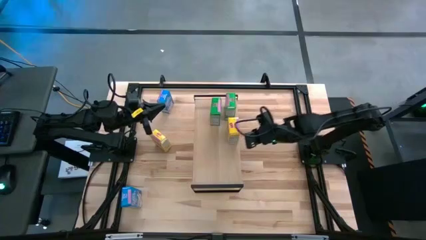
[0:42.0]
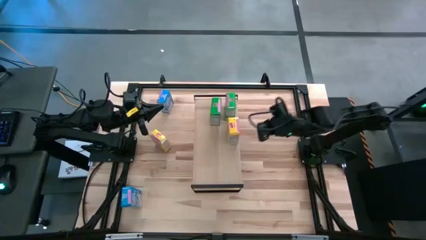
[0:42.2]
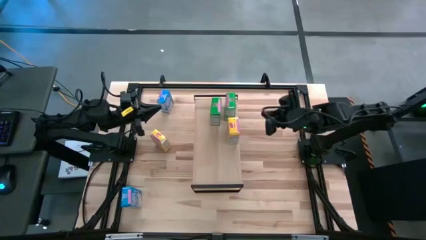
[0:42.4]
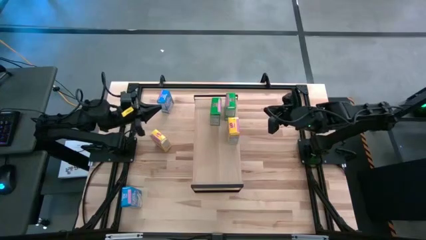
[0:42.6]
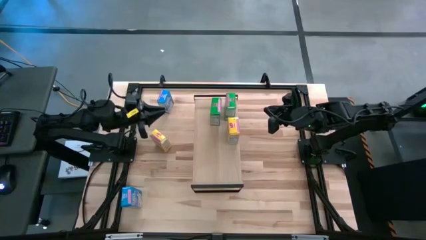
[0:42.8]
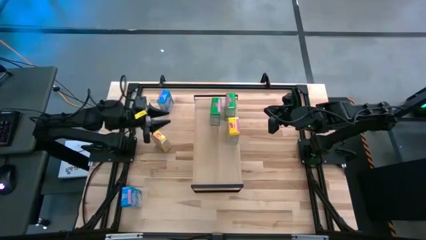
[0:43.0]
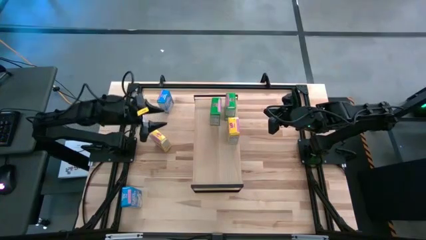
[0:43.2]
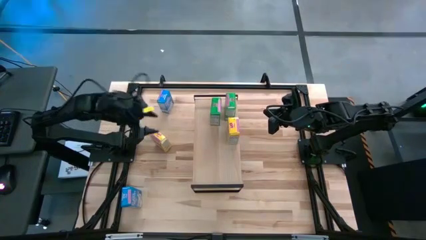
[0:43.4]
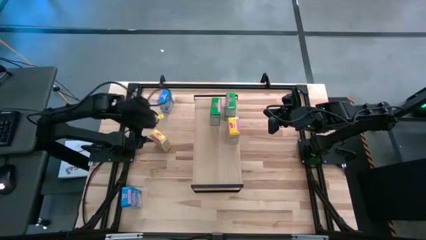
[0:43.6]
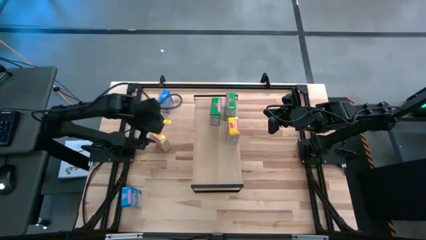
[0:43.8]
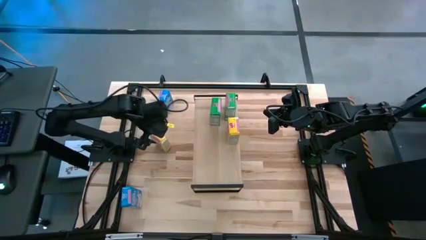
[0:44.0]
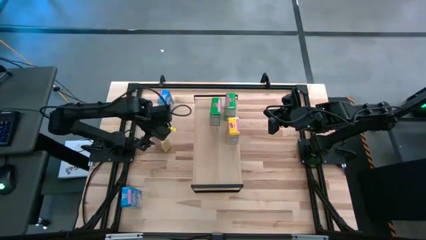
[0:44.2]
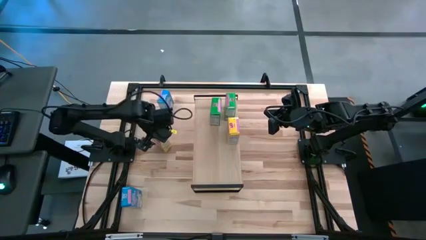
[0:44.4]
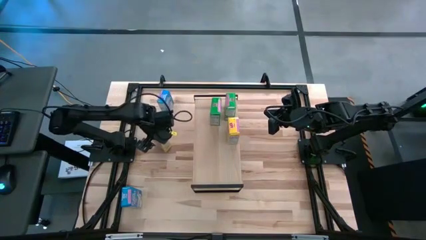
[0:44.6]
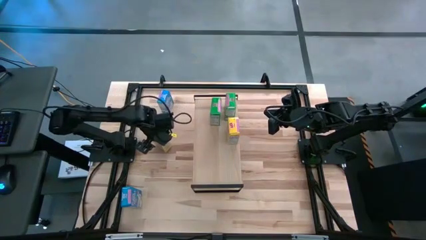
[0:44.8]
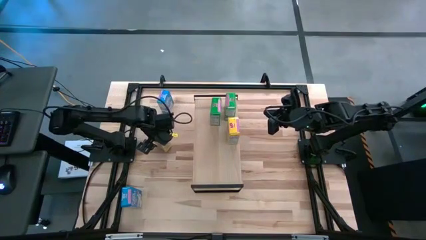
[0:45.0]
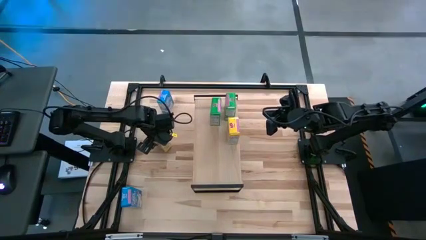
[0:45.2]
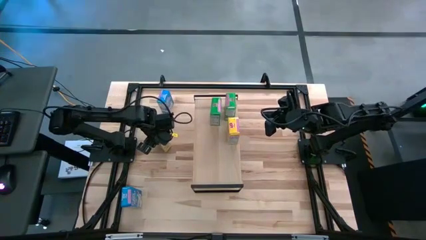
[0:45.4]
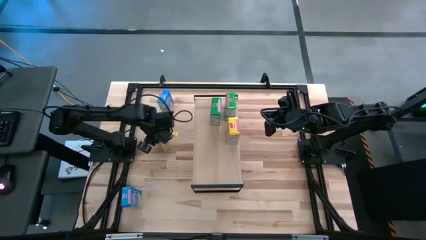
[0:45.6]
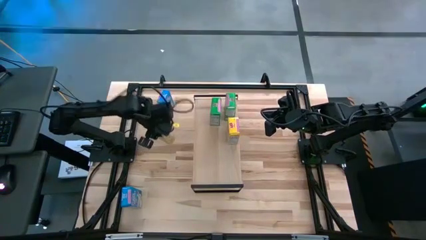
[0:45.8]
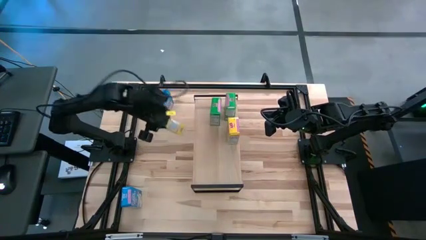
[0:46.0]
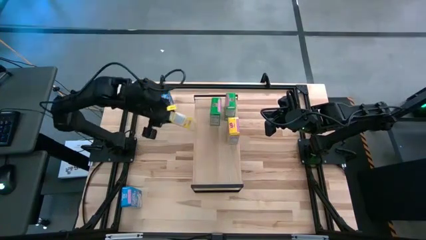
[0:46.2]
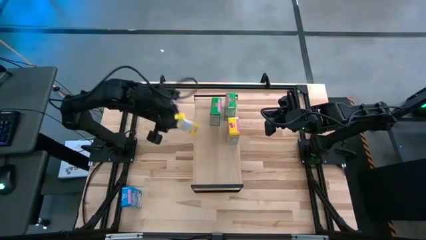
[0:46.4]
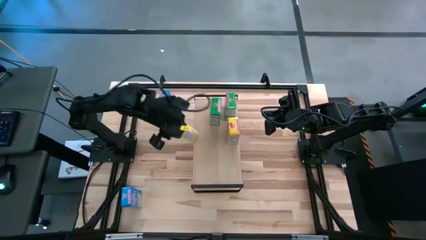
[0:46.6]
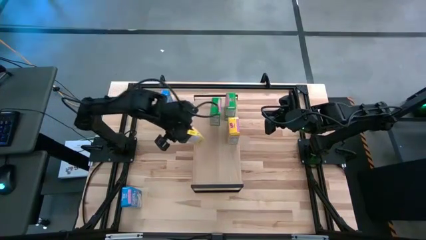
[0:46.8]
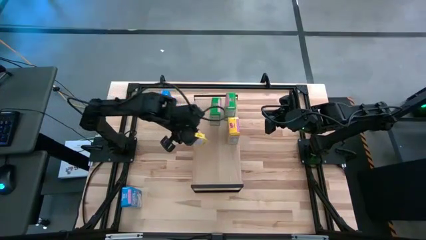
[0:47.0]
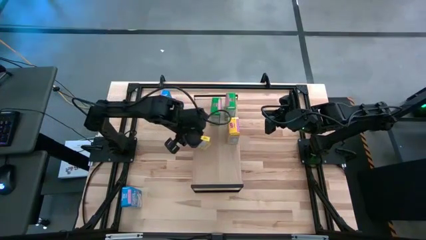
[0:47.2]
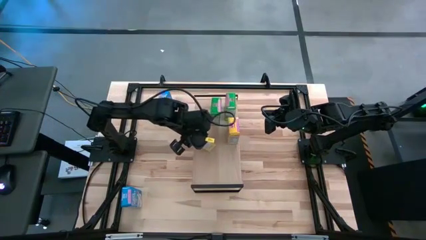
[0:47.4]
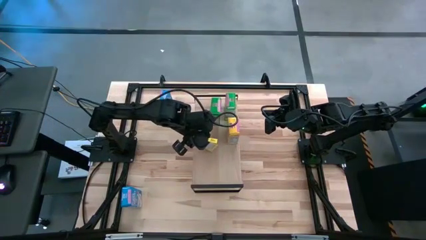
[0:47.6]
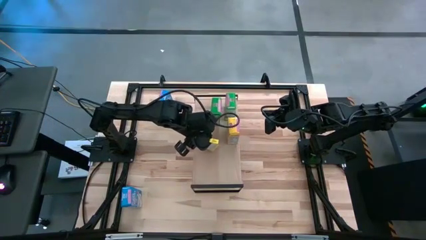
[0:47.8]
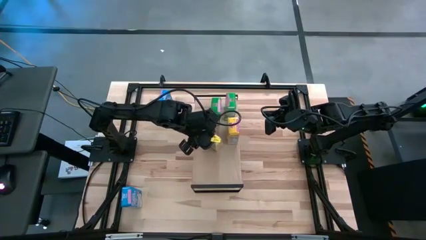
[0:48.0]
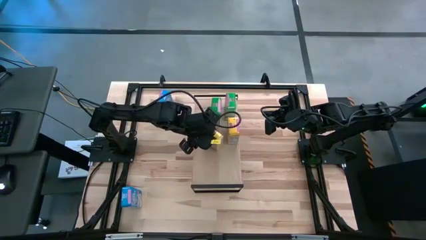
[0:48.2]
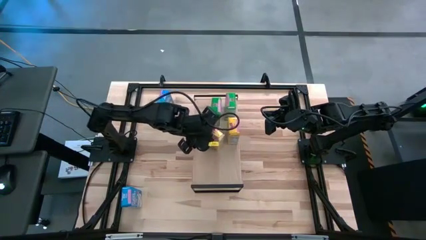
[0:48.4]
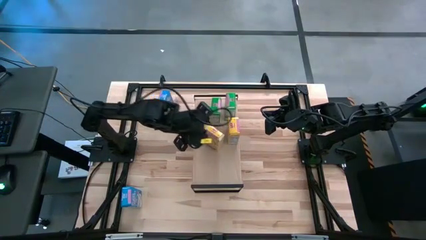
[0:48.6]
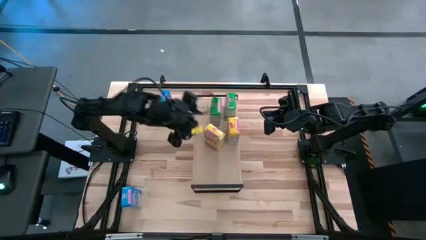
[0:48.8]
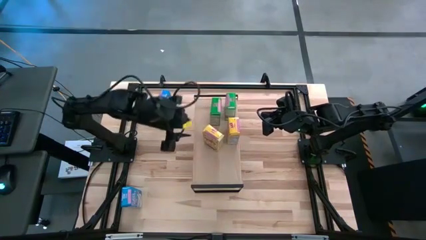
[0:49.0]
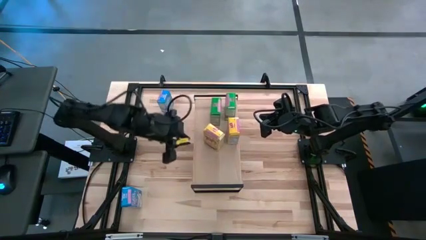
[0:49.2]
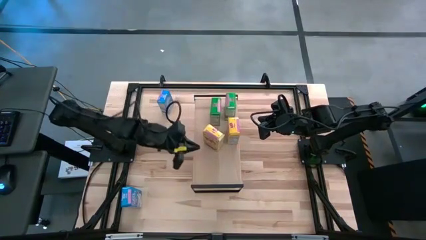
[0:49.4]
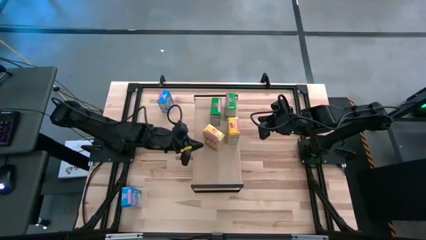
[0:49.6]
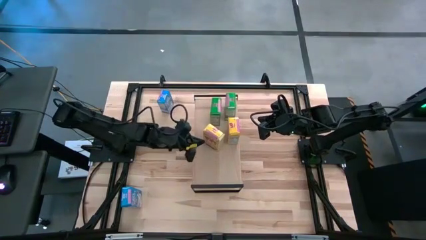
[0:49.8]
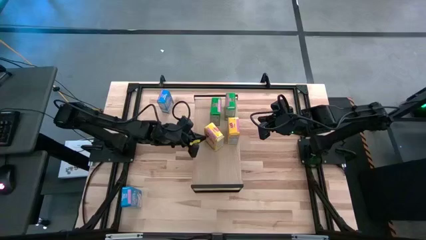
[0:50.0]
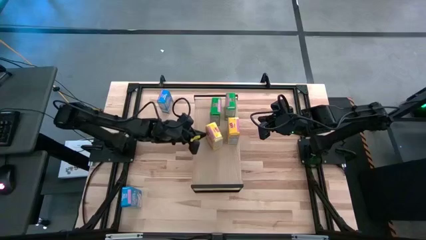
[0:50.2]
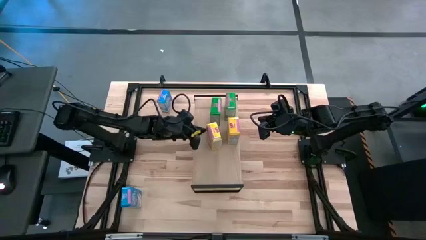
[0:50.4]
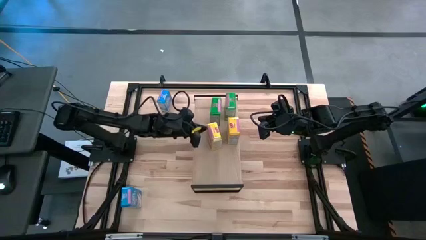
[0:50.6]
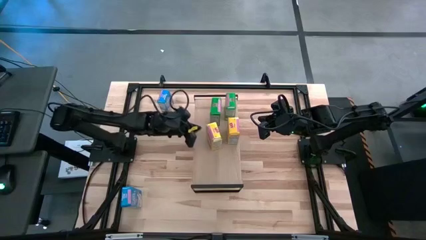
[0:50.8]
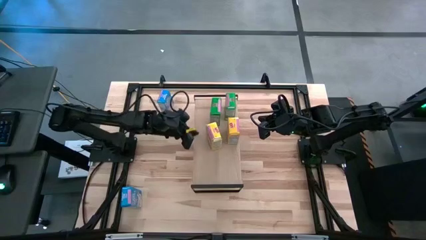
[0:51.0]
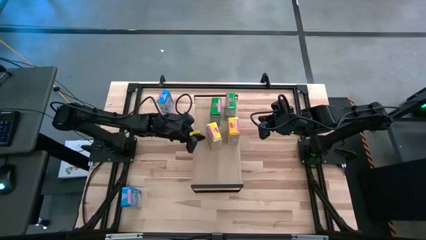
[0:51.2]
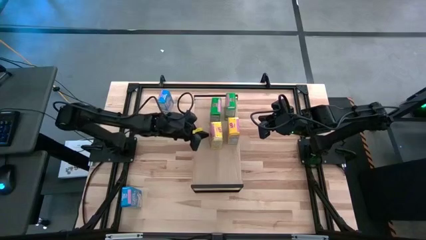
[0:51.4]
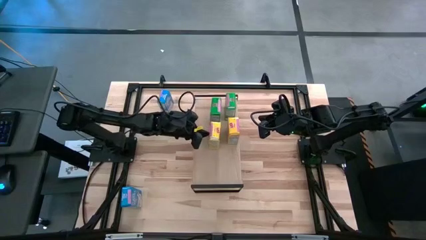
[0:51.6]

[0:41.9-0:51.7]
Task: Stack cereal on shelf
Put the yellow cereal box on the shelf

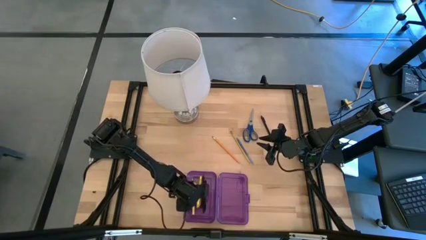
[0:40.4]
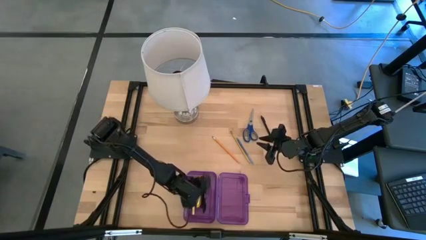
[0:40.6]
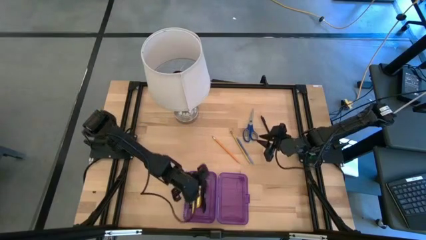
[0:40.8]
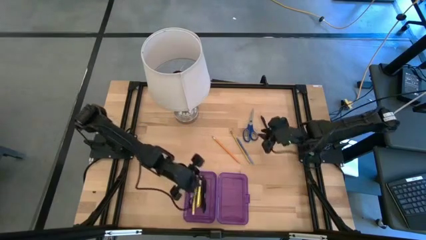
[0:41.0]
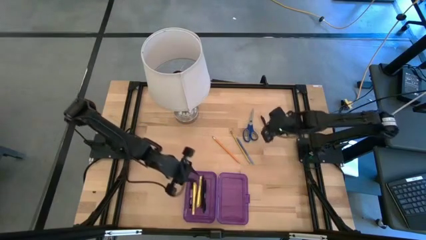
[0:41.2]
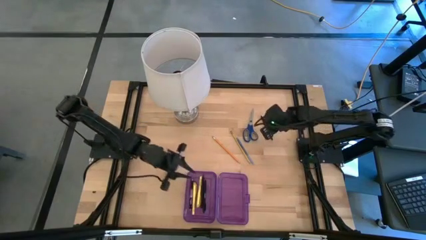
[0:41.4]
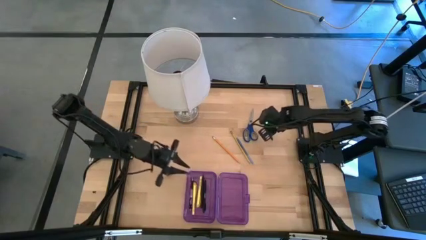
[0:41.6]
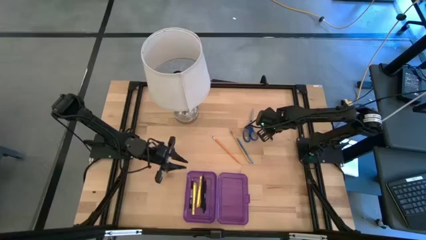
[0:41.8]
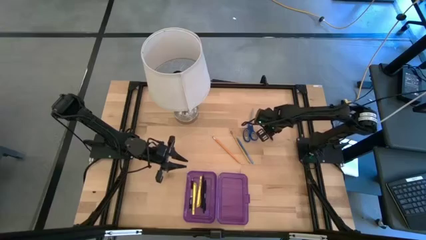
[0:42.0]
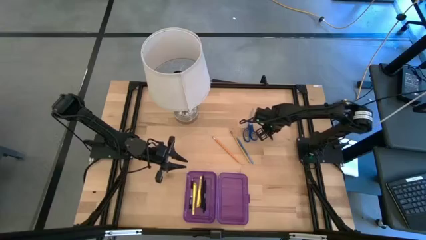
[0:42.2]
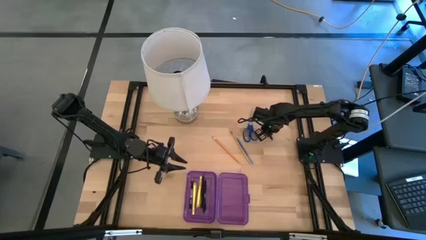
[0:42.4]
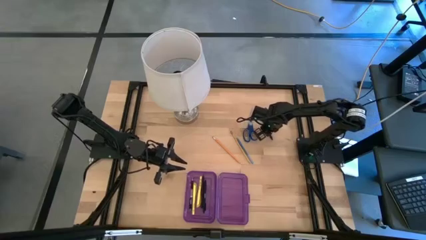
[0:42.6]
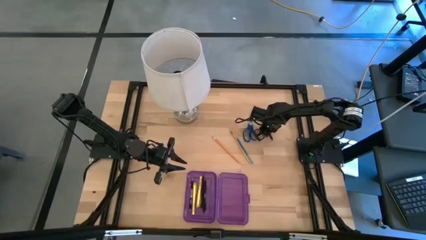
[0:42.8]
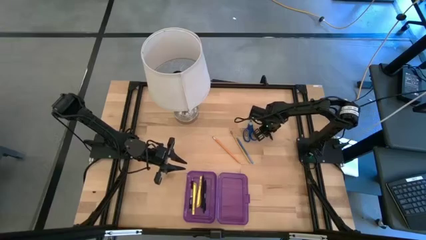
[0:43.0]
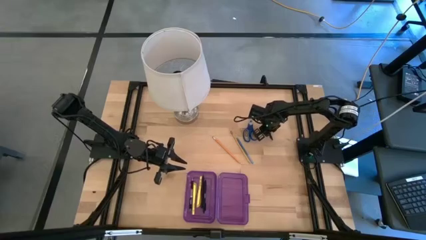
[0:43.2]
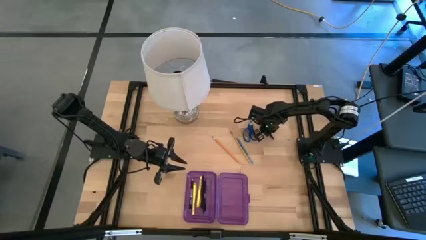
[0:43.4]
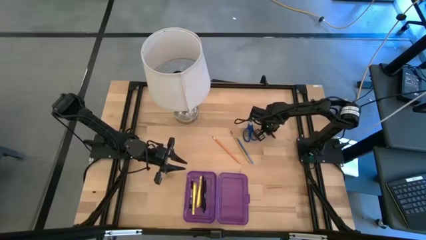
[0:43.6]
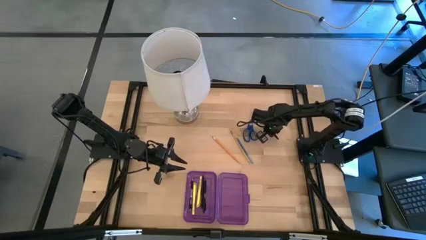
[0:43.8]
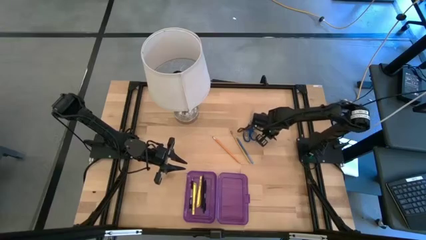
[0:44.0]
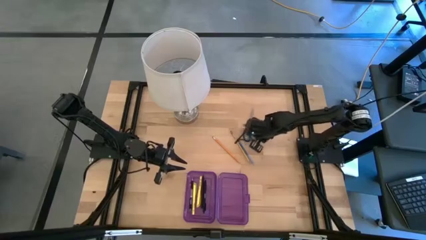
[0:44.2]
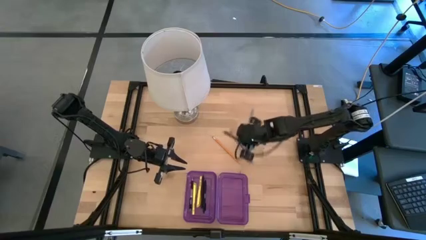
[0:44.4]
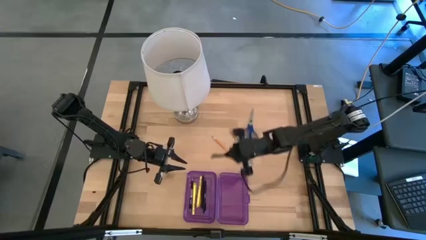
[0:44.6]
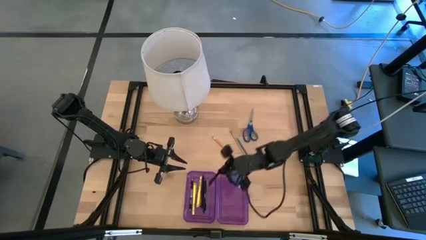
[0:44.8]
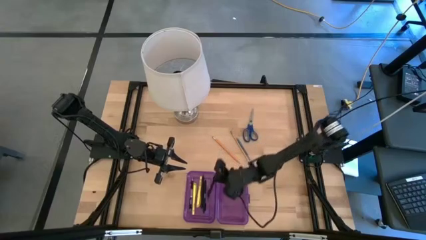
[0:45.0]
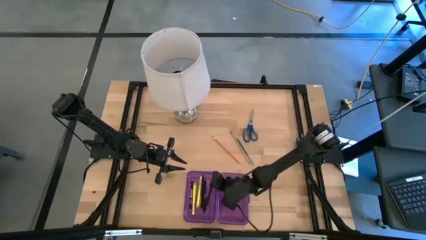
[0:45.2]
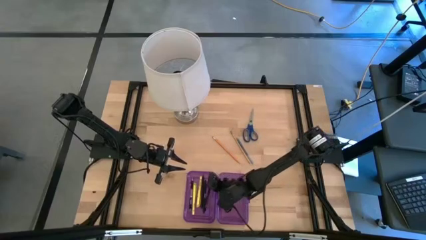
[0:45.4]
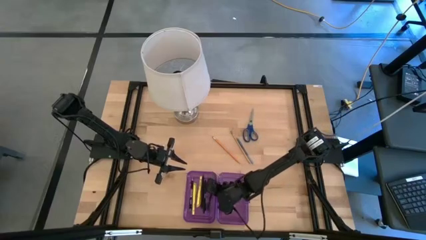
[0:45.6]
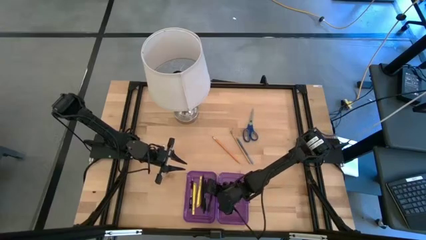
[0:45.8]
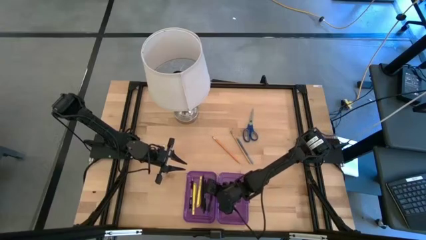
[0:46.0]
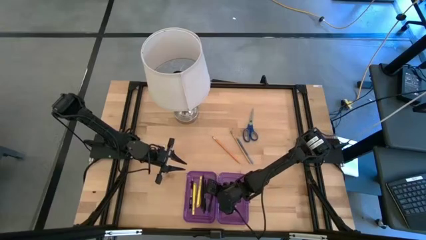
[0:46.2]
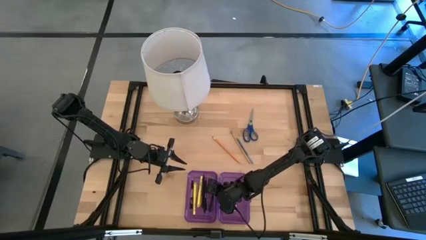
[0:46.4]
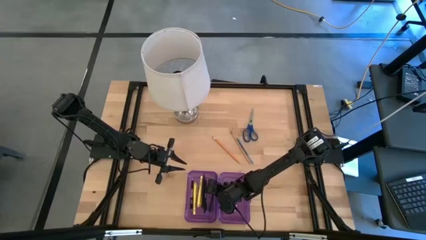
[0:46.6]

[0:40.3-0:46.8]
Task: Pick & place school supplies into a supply box
Put the black pen into the violet supply box
